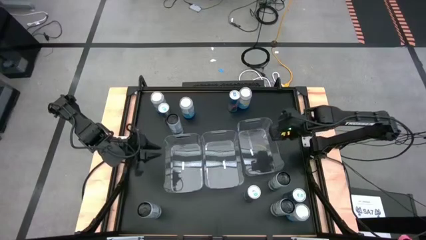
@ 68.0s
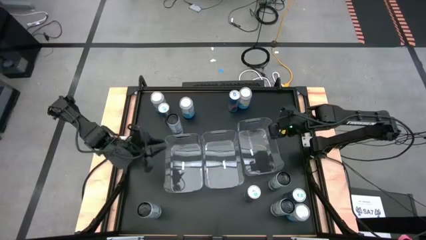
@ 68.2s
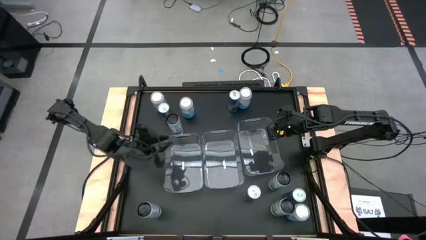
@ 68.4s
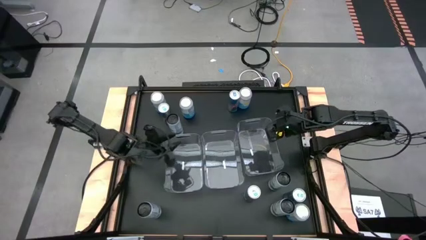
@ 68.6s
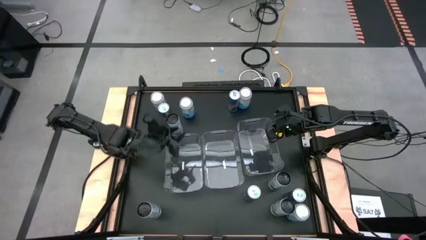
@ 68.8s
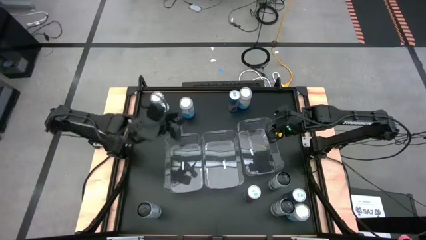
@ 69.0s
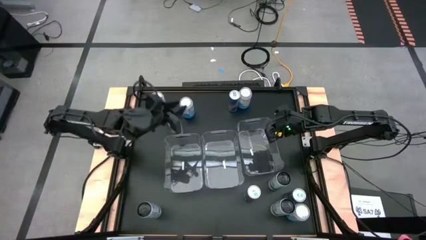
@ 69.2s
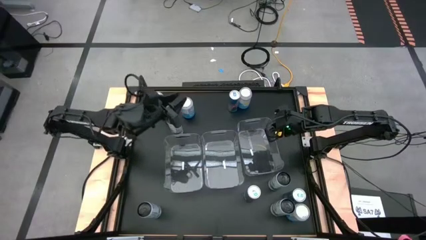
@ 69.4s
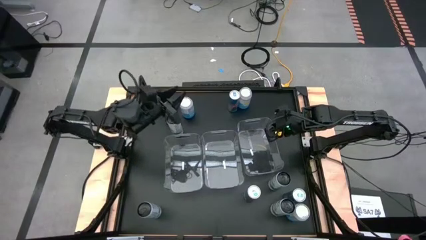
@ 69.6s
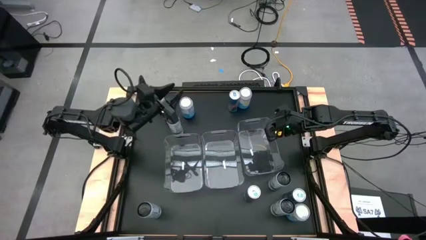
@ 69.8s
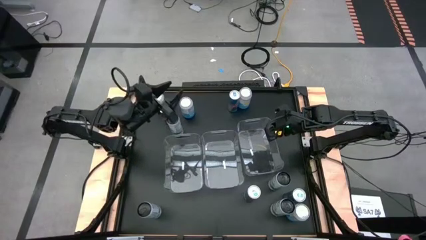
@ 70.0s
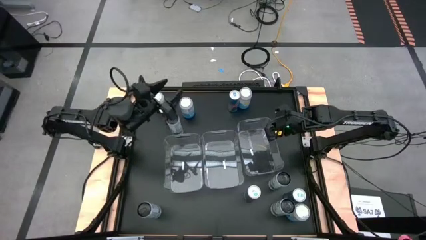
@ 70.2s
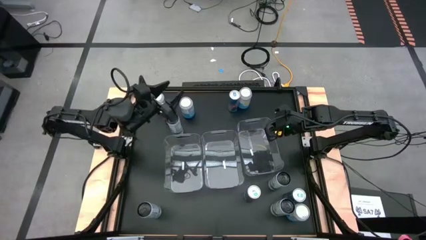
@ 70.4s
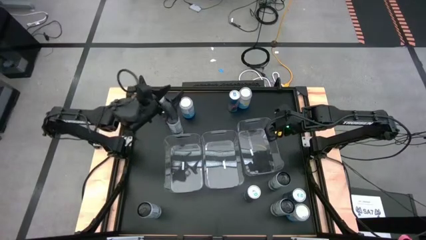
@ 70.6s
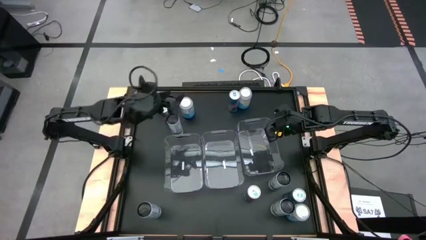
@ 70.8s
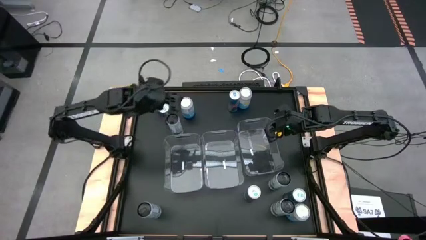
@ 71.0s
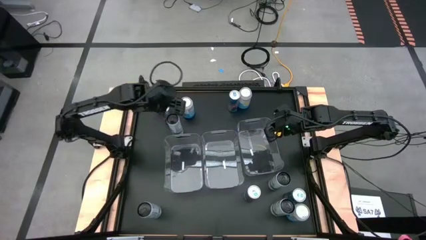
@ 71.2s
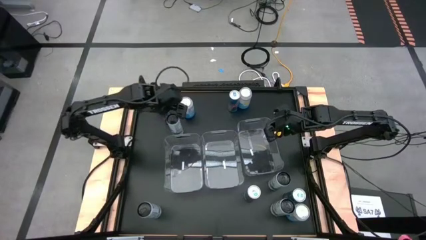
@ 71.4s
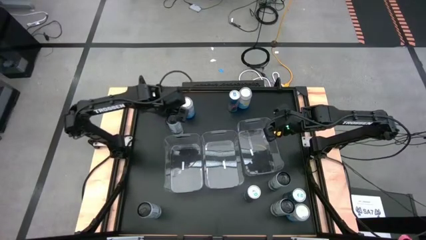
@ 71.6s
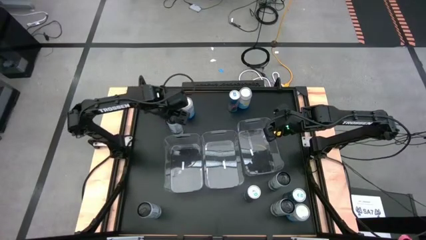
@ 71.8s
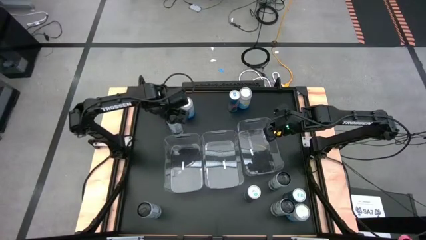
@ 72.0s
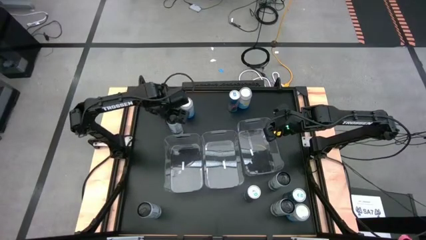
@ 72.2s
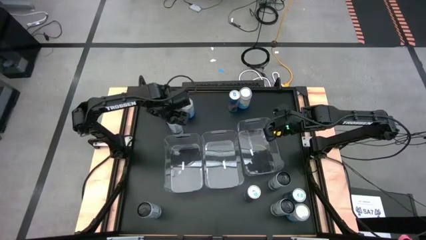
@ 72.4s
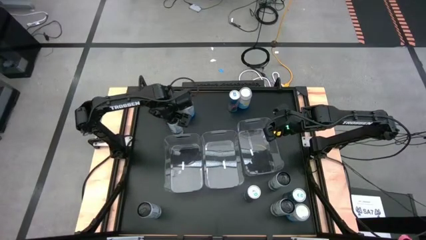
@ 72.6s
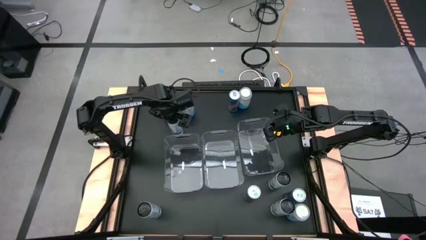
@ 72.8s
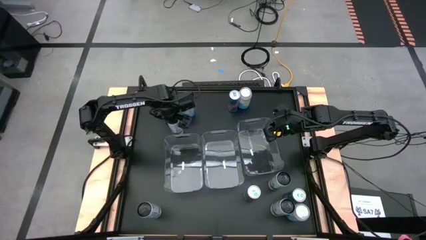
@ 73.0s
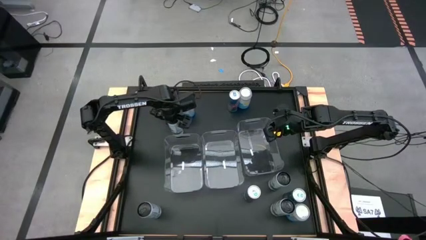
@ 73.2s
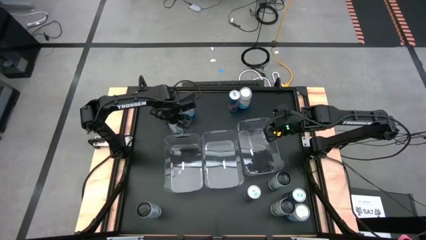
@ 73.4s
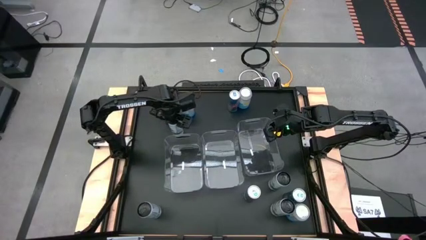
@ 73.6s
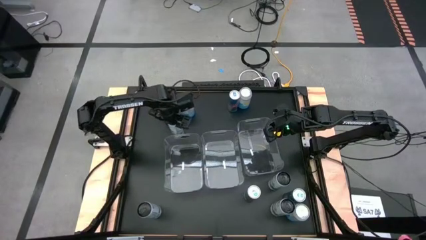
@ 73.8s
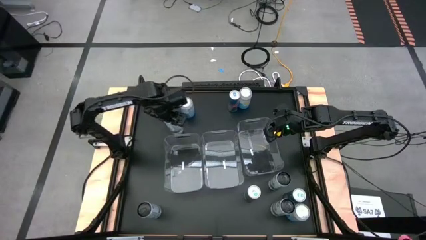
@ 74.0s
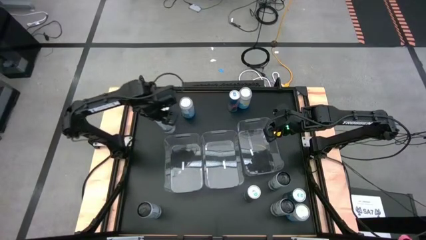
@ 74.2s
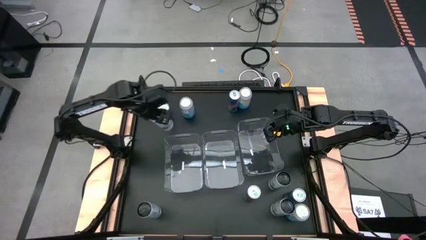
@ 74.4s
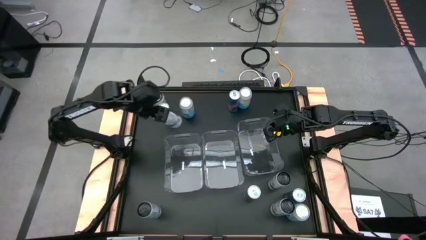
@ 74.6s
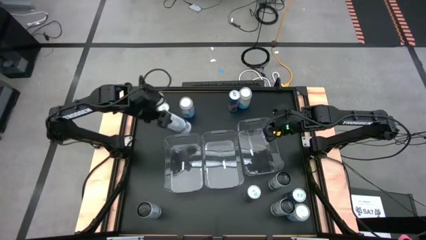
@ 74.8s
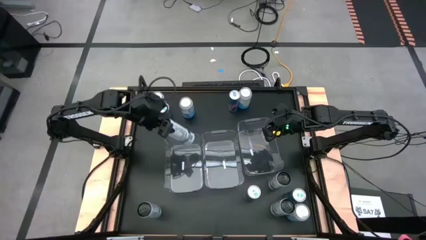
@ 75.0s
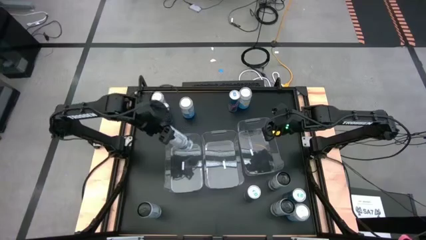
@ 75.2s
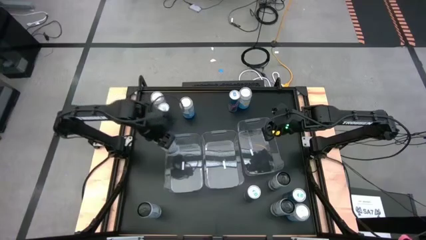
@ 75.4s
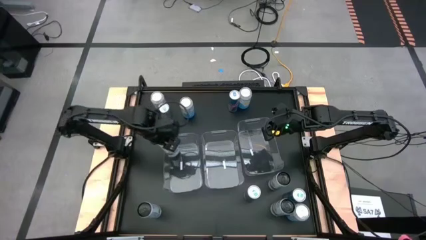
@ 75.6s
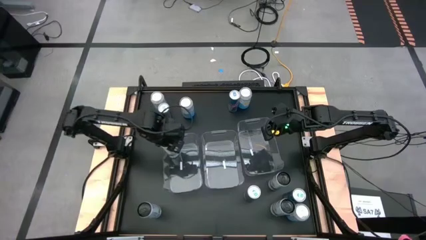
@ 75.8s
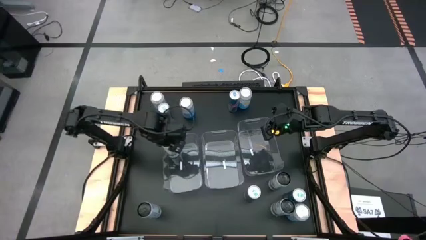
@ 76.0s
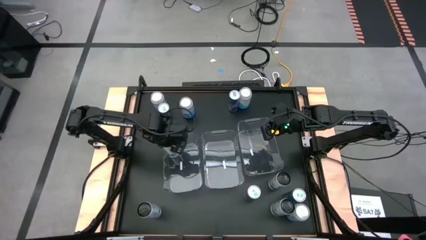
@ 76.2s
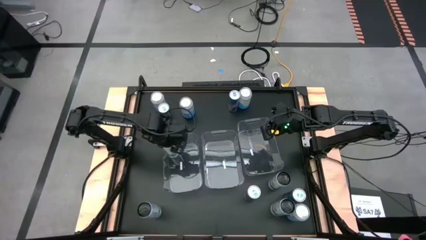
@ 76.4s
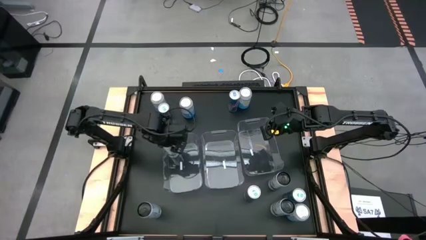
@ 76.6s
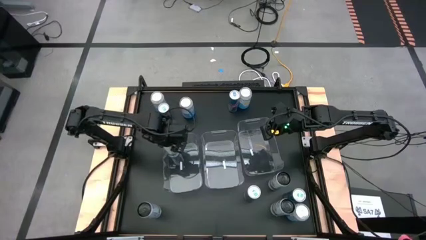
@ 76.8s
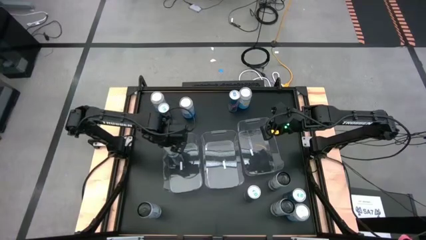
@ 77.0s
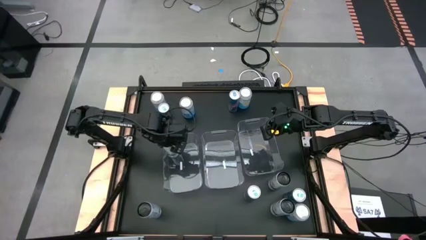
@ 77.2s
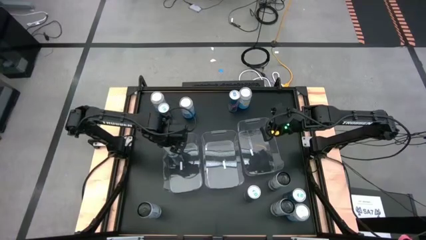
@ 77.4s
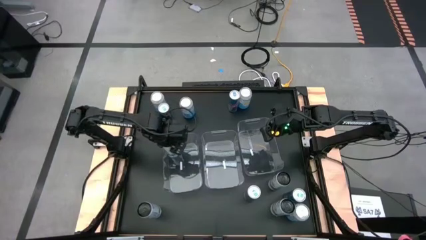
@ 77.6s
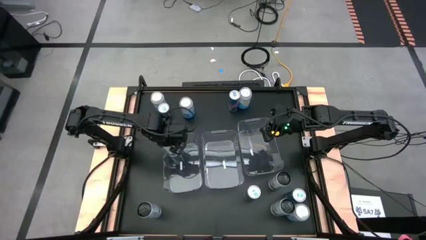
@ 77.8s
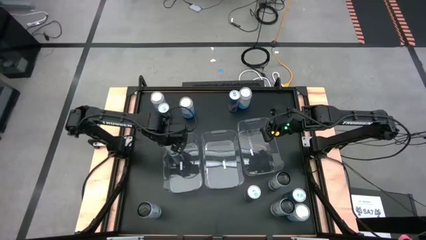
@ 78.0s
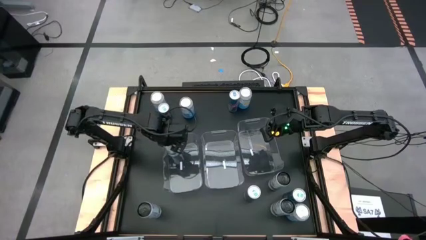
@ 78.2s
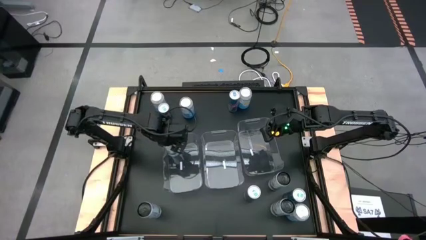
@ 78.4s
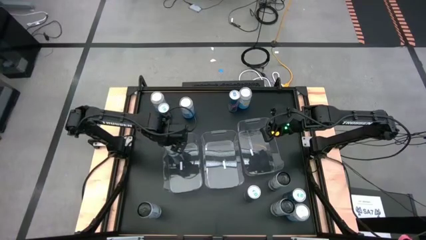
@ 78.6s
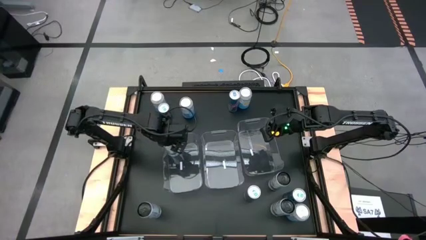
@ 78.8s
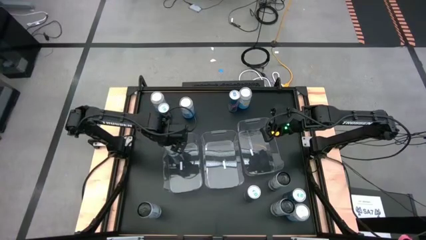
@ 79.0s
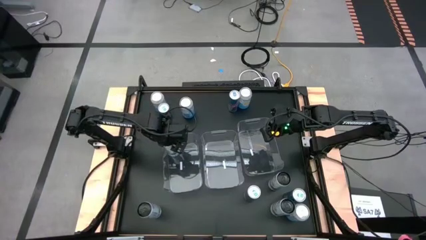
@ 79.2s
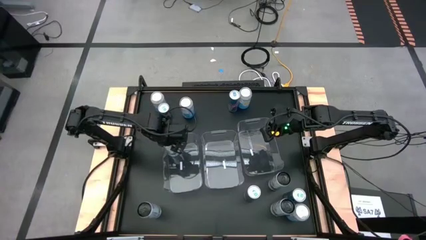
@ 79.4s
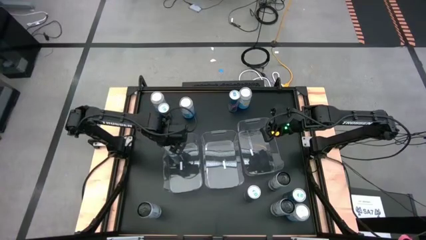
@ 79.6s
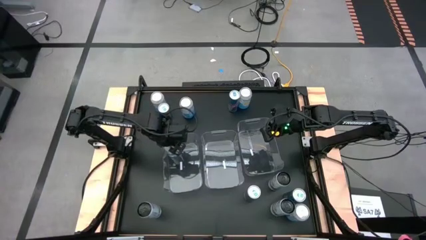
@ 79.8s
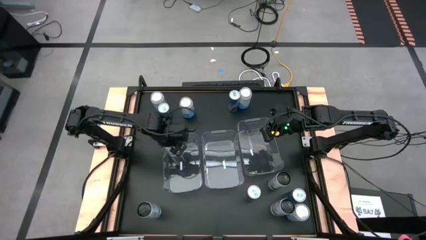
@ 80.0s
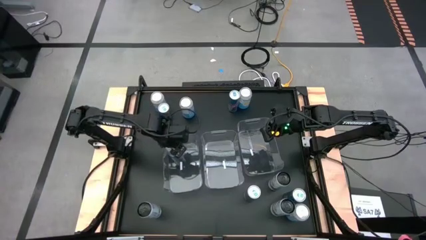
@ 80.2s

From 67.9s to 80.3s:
Task: Sort soda cans
Put the top left white soda can into the left transparent bin

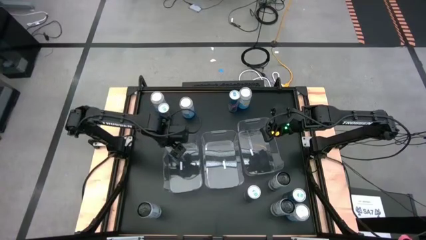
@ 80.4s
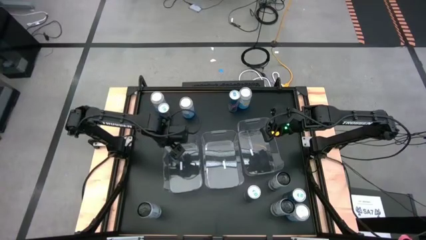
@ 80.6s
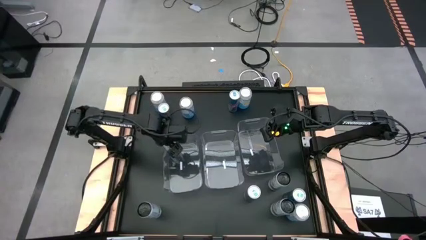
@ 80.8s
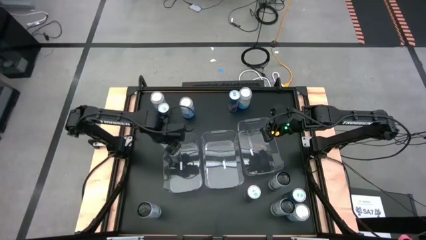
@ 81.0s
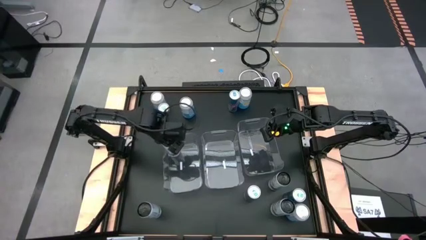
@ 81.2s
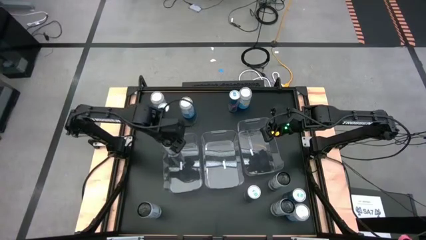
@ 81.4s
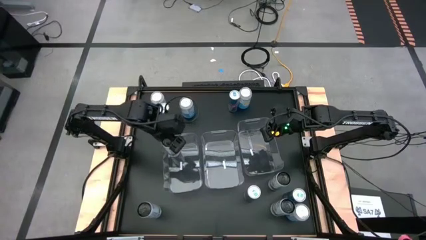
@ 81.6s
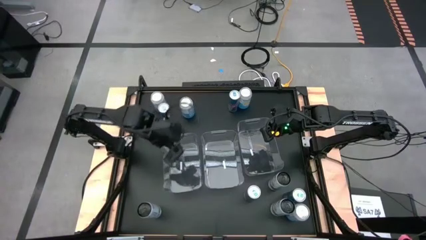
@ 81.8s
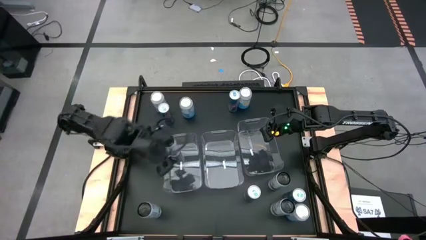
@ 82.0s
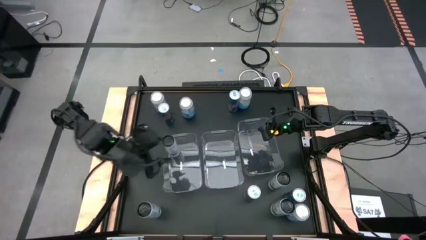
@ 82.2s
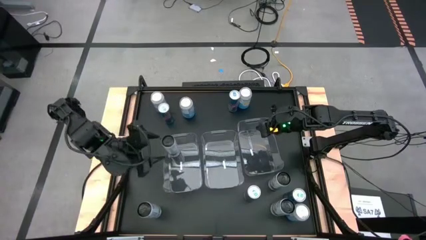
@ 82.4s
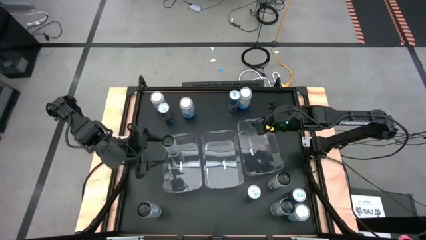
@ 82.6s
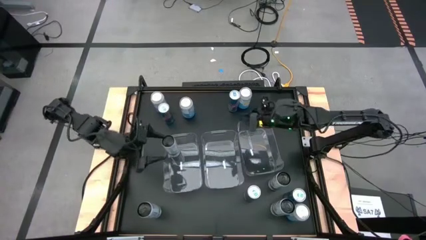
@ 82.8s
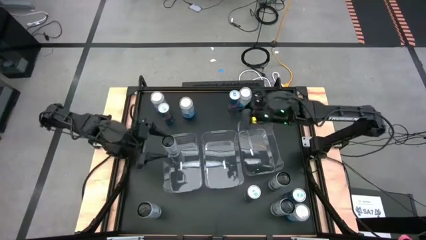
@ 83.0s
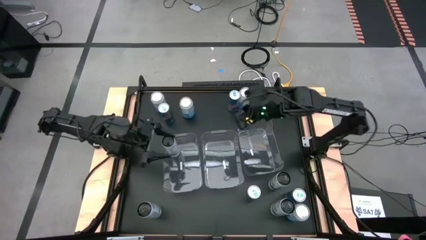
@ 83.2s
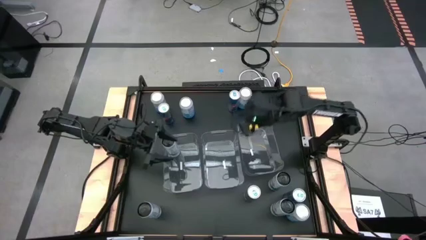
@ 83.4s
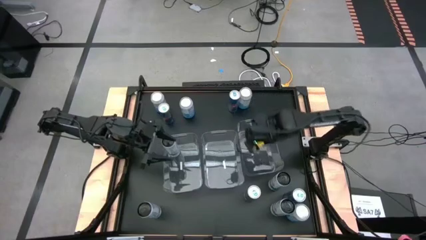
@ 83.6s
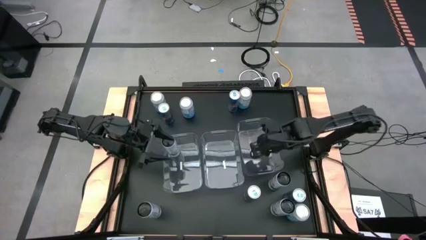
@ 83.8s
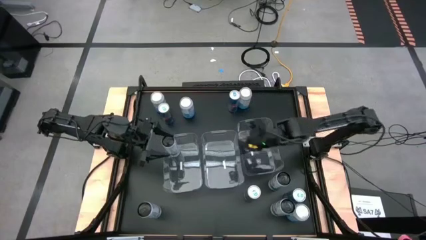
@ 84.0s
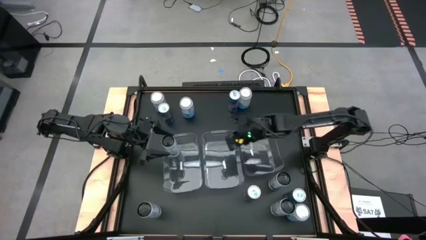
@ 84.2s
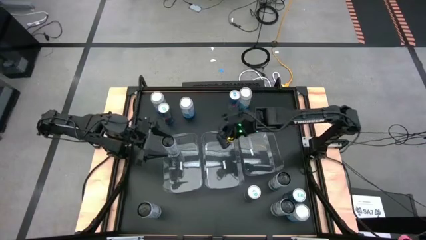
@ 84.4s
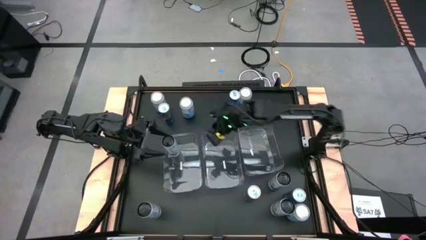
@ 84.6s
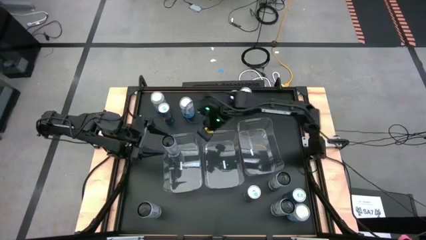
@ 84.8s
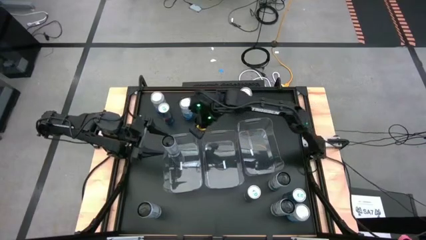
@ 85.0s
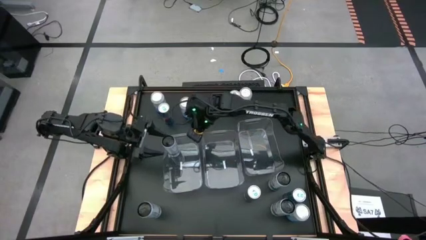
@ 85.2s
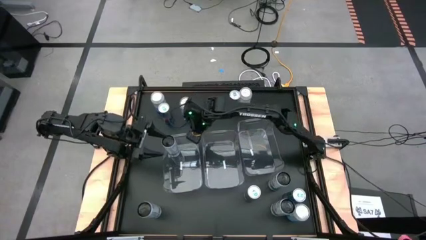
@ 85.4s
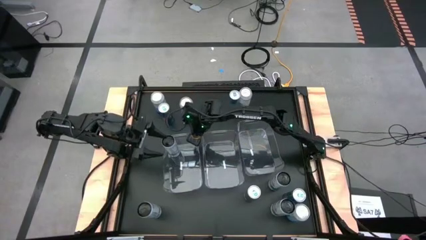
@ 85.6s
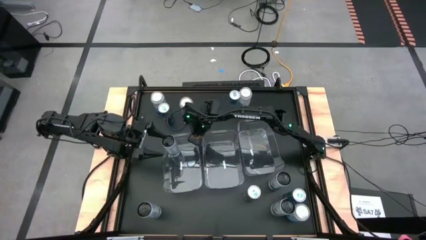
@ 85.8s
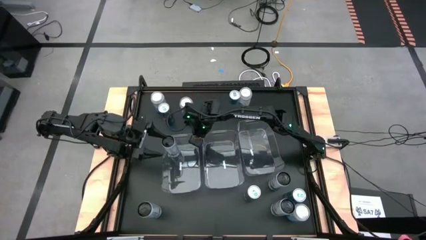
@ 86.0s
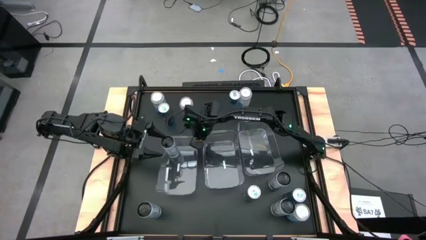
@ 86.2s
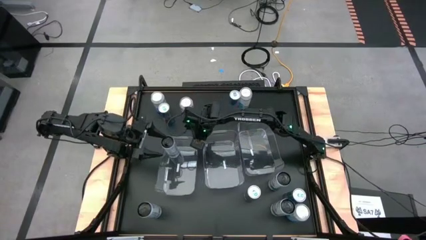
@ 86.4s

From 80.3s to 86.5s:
Adjust the left transparent bin
